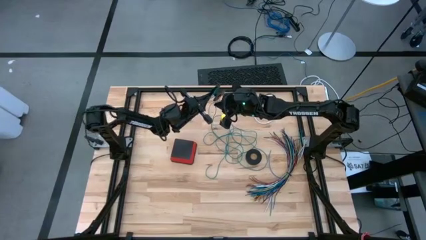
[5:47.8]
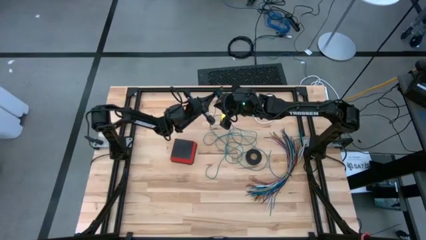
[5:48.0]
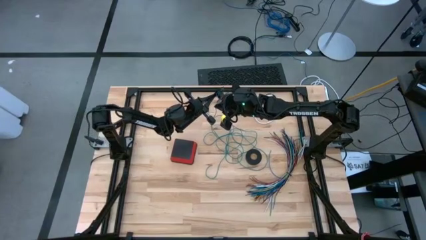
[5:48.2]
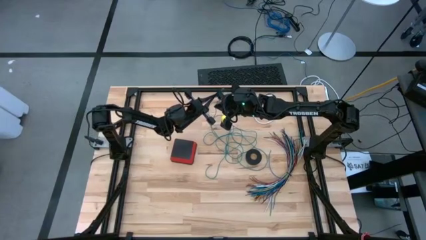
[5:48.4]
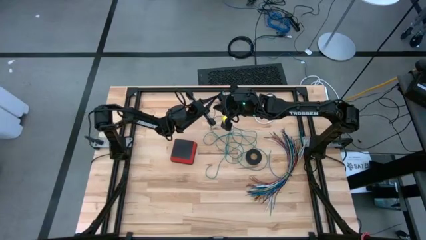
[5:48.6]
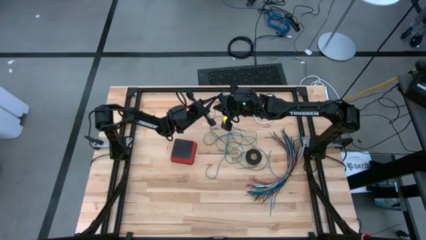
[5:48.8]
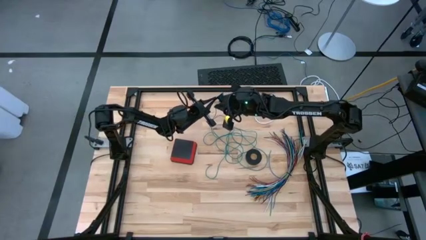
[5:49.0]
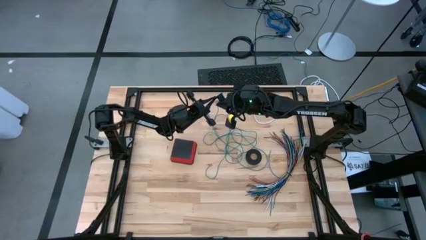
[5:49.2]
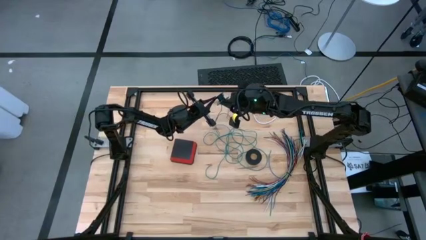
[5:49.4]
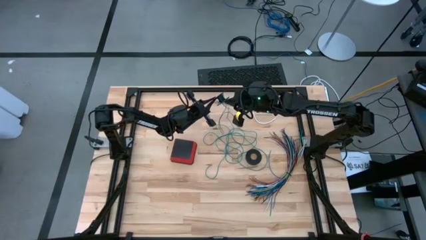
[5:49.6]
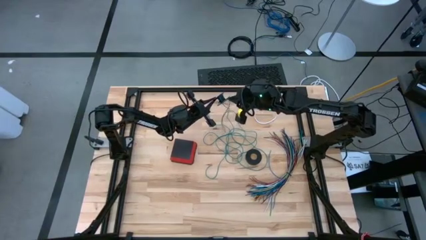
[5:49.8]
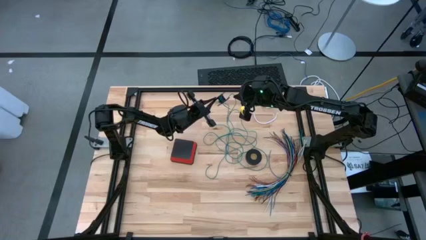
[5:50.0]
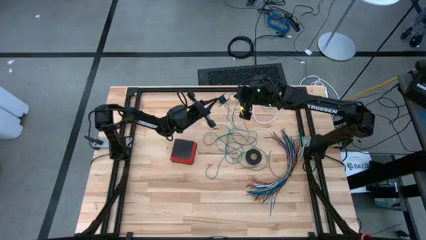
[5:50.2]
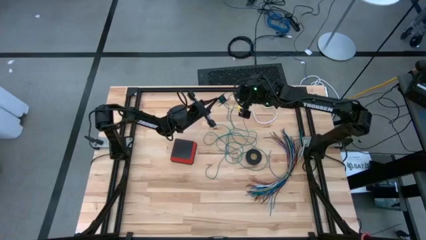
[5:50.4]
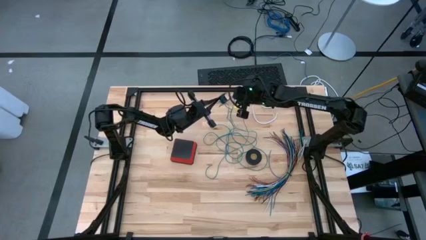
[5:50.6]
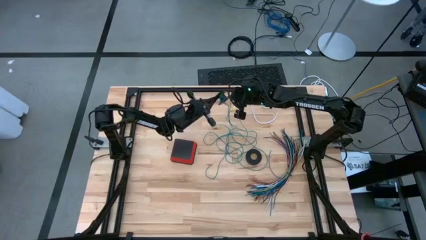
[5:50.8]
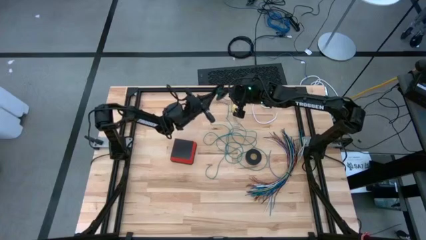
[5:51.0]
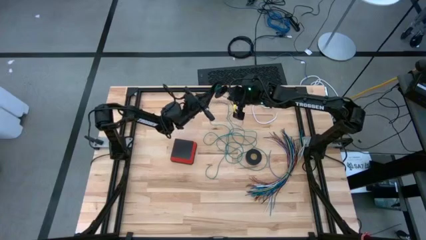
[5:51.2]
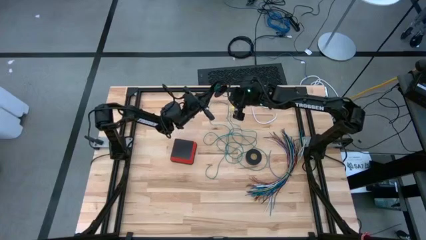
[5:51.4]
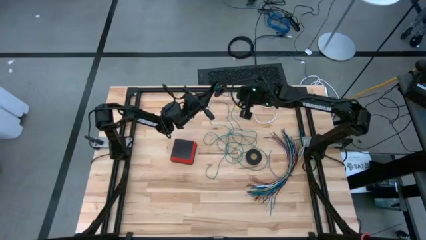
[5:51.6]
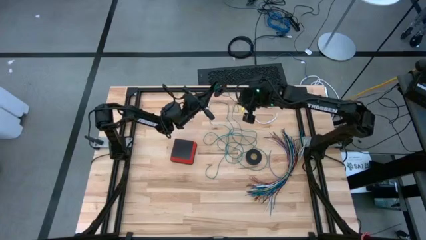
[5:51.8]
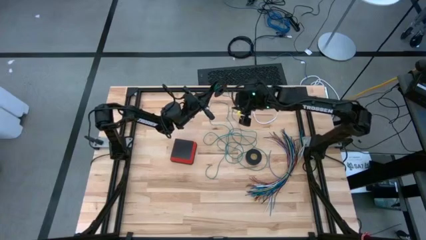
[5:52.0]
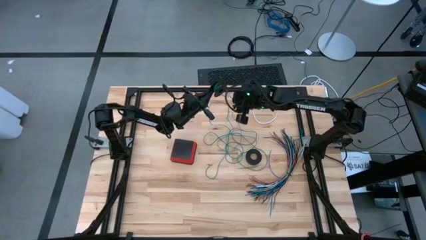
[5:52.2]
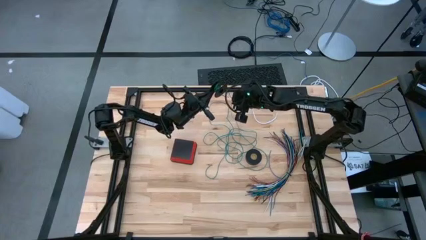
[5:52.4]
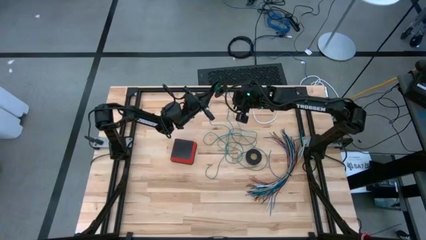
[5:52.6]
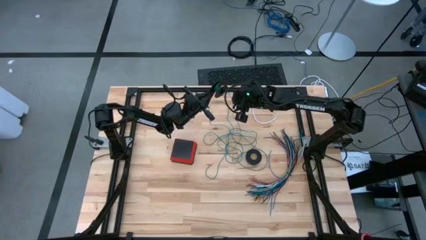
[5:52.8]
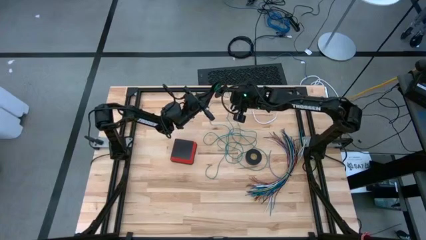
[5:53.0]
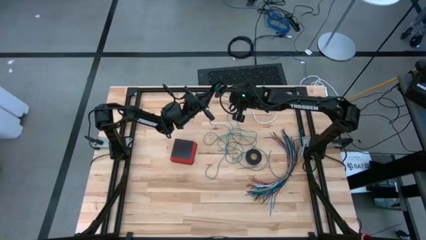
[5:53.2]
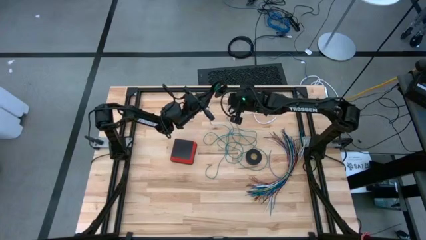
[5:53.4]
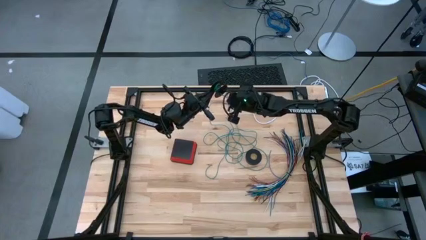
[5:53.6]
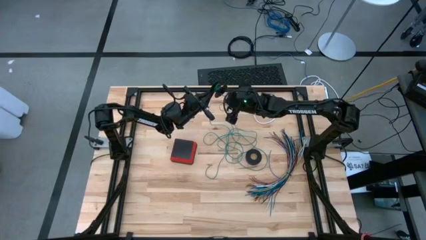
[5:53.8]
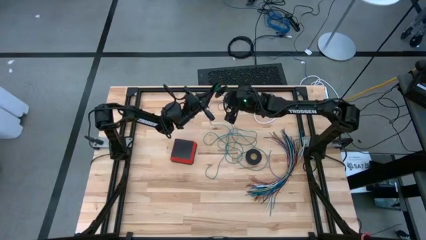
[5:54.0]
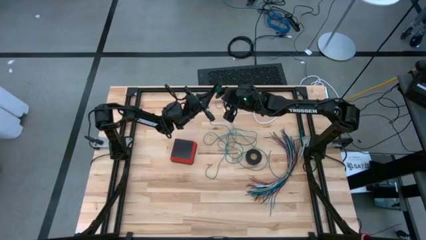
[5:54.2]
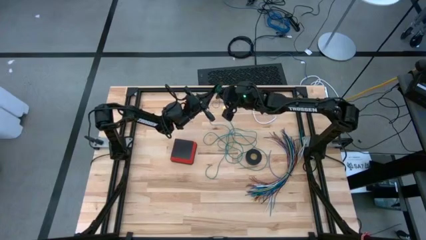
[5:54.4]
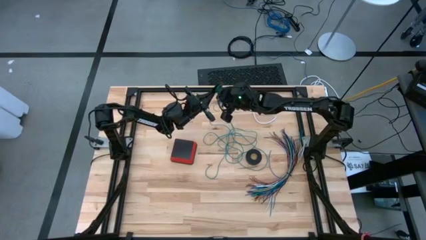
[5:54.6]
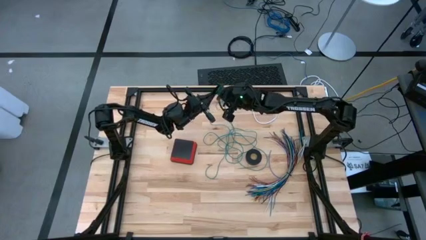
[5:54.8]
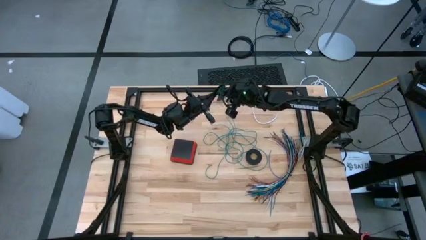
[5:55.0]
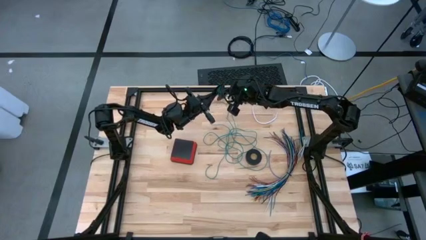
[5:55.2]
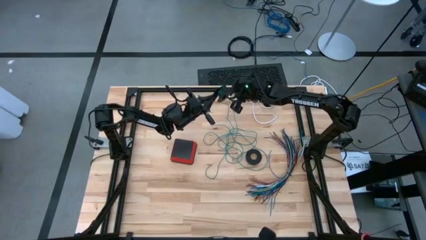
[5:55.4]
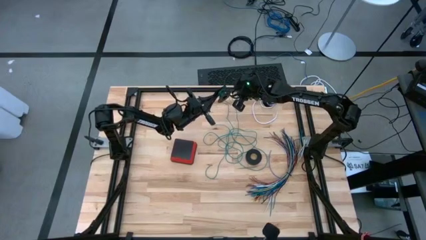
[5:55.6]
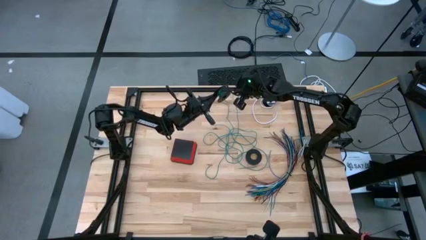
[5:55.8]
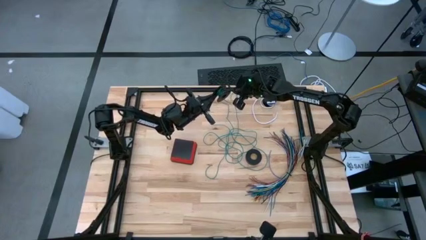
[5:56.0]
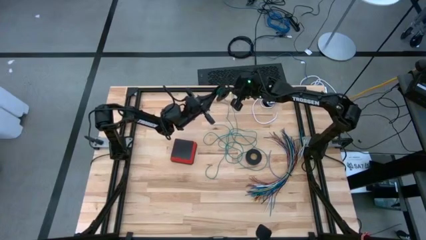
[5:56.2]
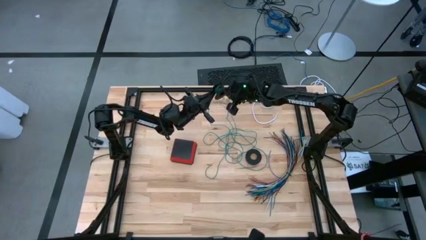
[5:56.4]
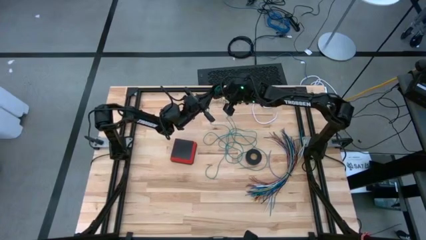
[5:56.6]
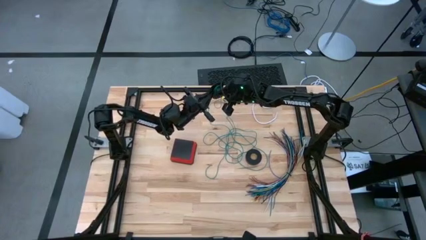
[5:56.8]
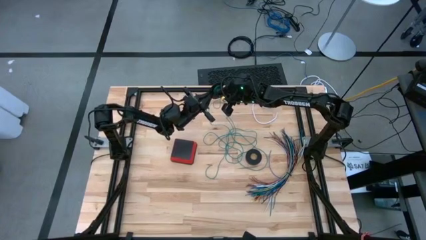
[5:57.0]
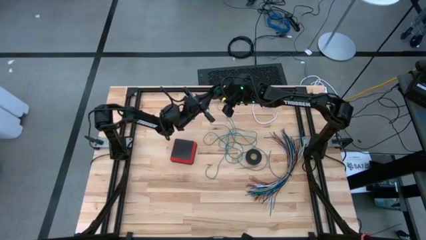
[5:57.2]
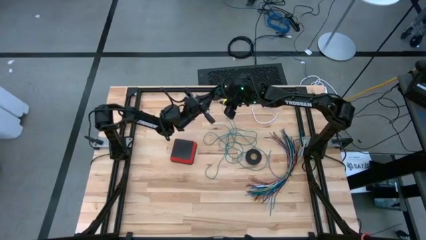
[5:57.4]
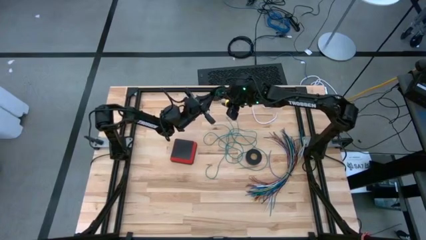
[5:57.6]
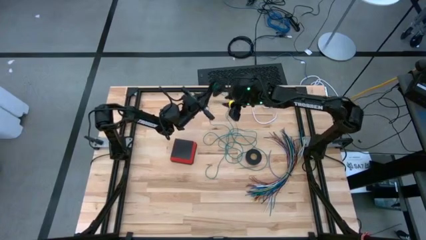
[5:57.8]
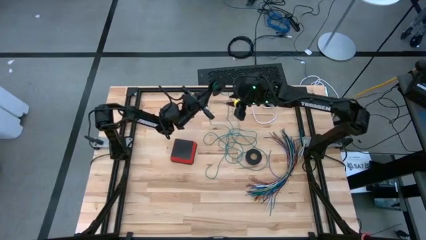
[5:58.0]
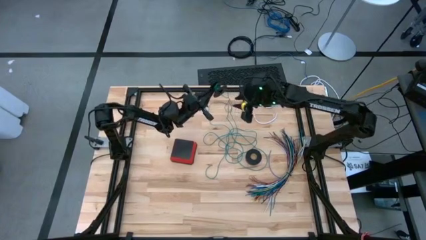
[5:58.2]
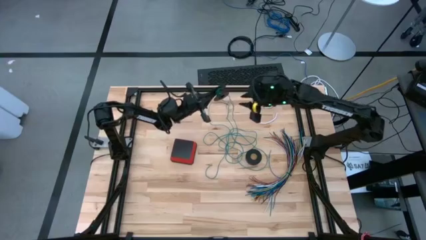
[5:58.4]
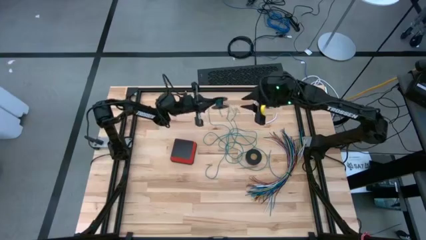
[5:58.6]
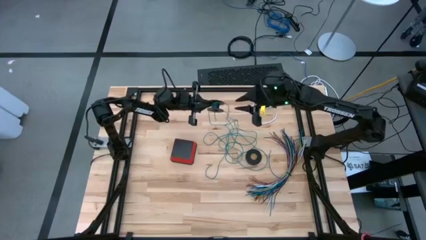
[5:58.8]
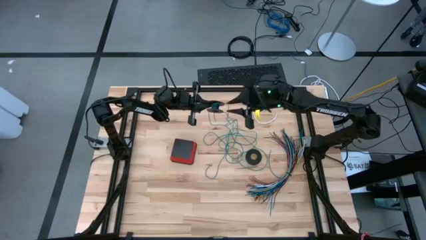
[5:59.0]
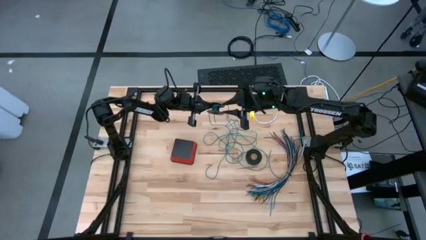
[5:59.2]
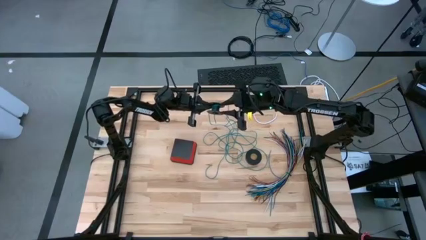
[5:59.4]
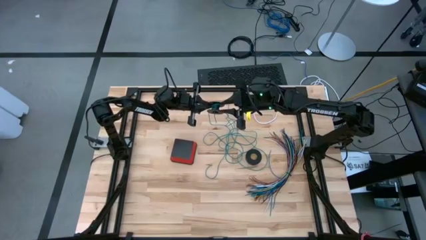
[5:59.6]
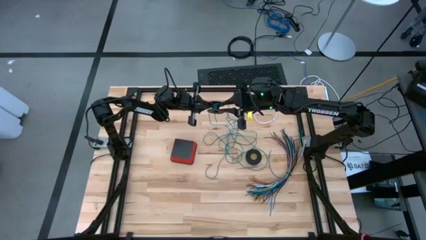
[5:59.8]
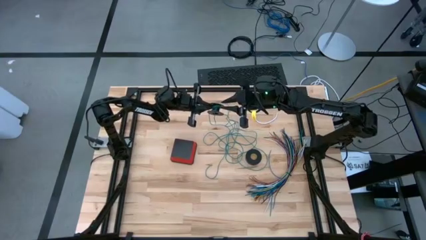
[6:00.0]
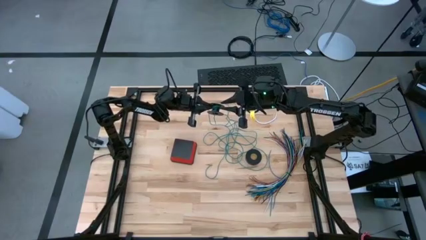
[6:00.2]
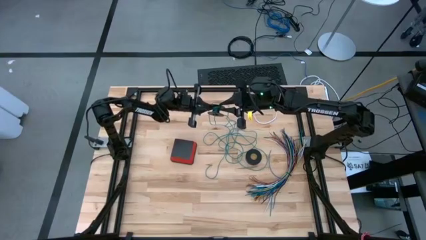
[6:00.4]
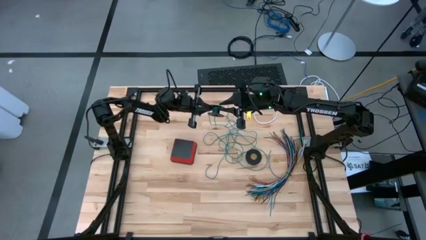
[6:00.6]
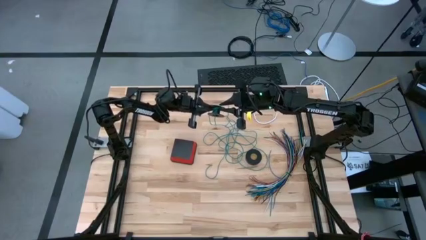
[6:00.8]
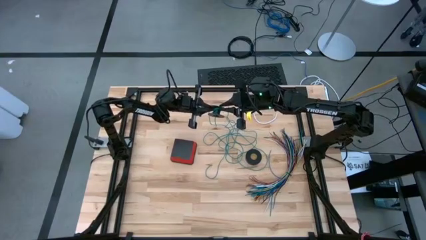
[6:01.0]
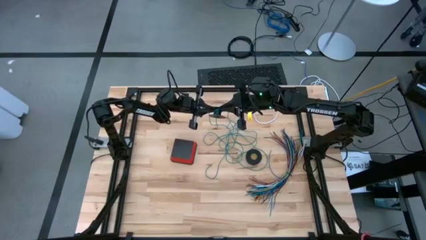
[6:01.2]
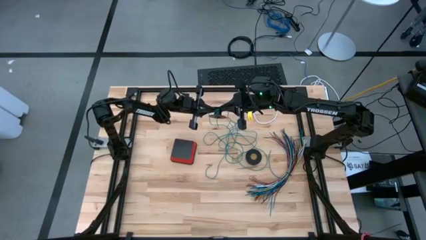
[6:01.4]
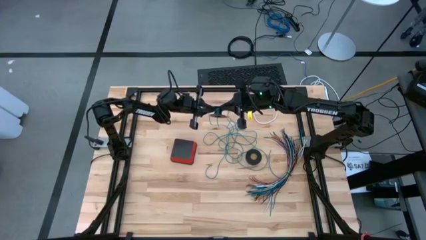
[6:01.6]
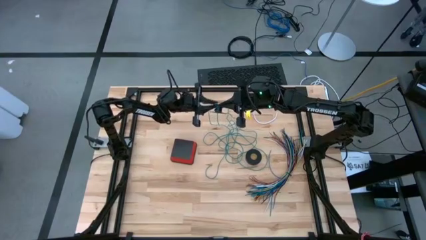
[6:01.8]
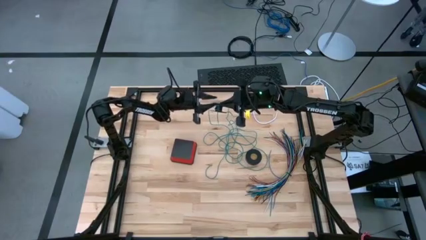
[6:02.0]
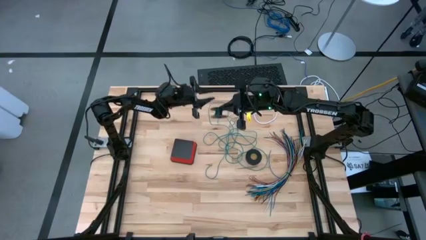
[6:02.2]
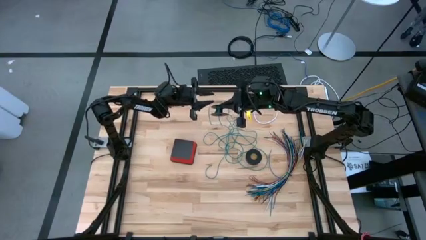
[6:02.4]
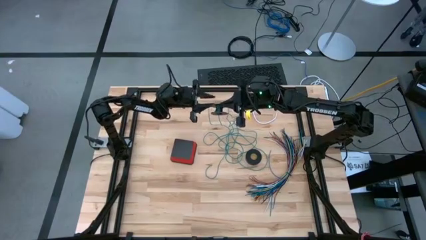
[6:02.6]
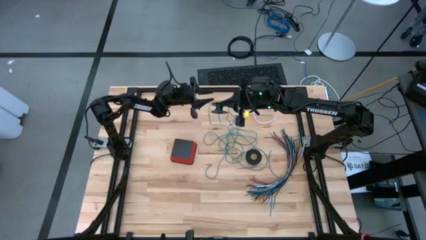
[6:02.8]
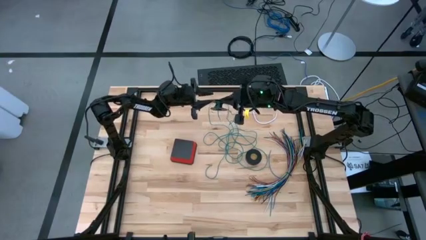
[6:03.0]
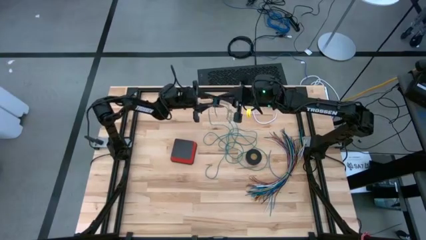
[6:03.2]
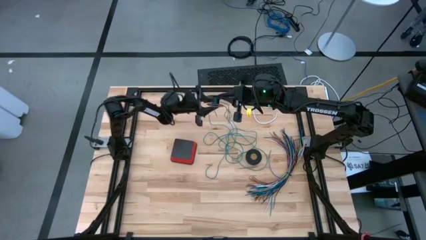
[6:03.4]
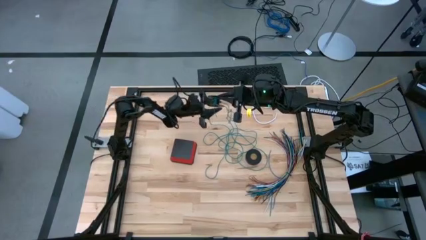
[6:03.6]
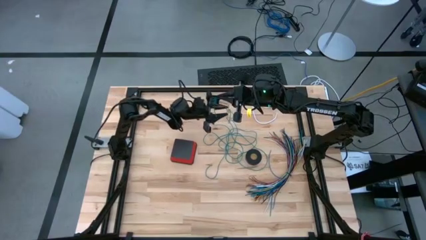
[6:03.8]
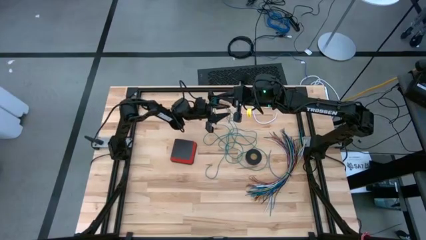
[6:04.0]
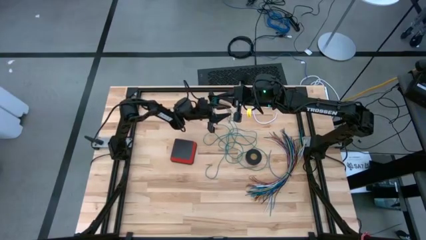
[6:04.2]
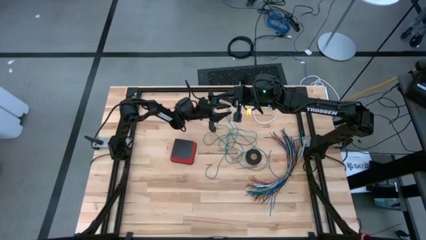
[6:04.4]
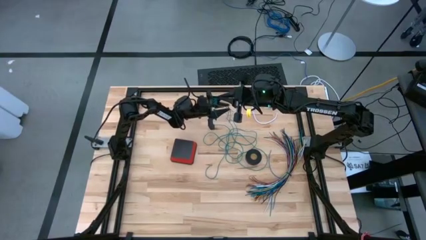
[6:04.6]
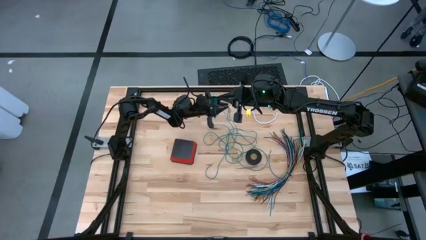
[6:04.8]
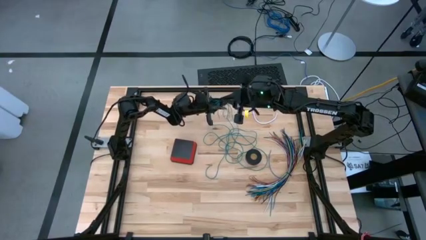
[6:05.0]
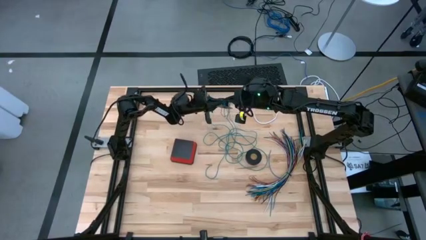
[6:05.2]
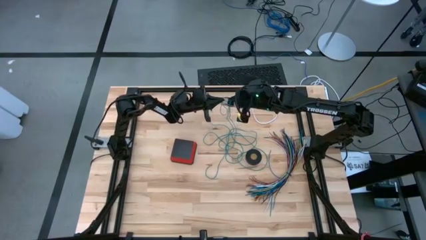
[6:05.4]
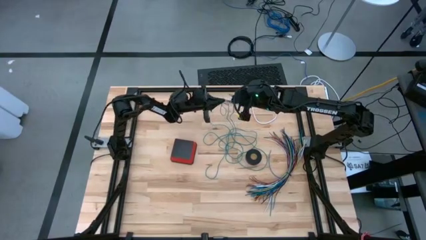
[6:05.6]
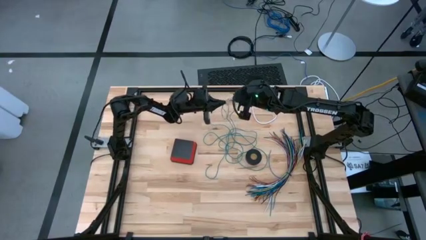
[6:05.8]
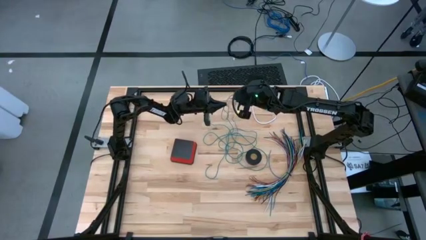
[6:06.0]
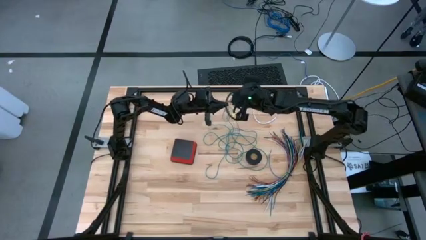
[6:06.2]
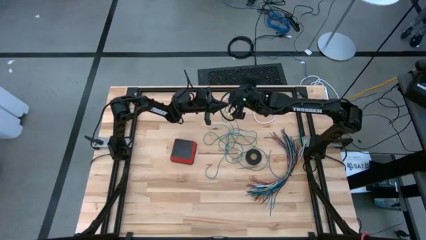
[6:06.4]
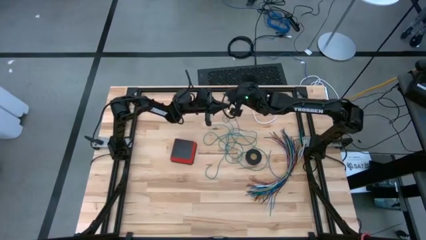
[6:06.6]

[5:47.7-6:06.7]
Task: Coiling cords
Coil the green wire cable on the spool
